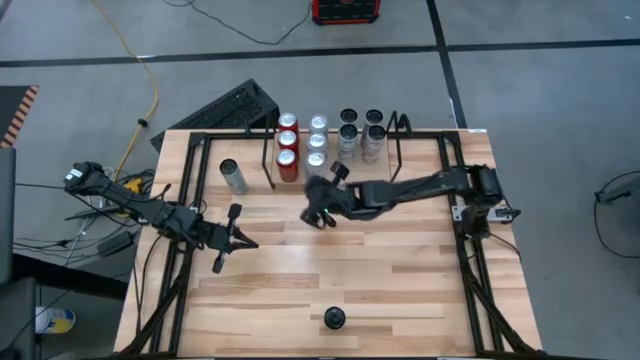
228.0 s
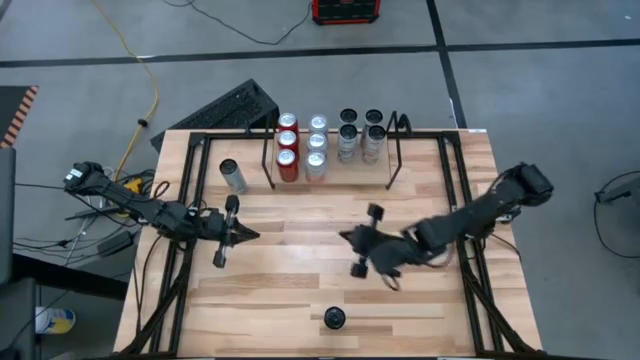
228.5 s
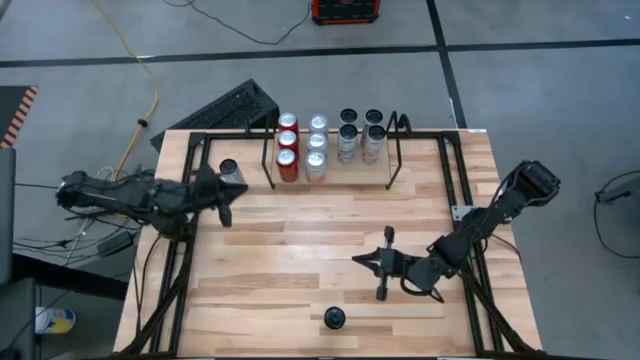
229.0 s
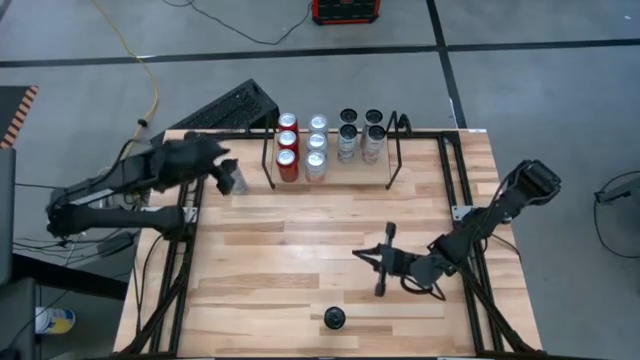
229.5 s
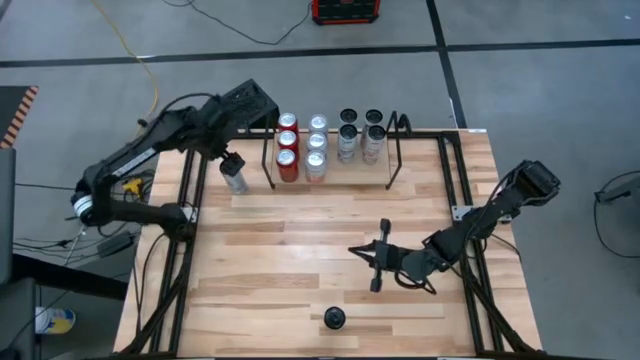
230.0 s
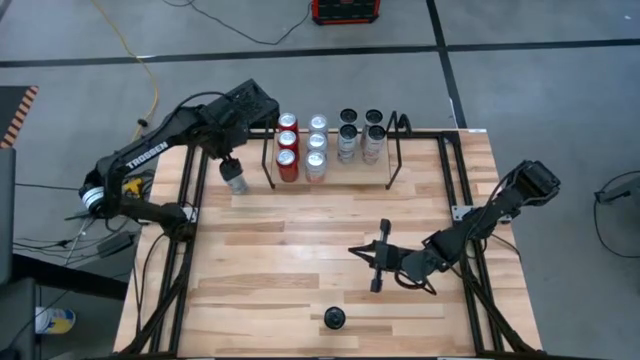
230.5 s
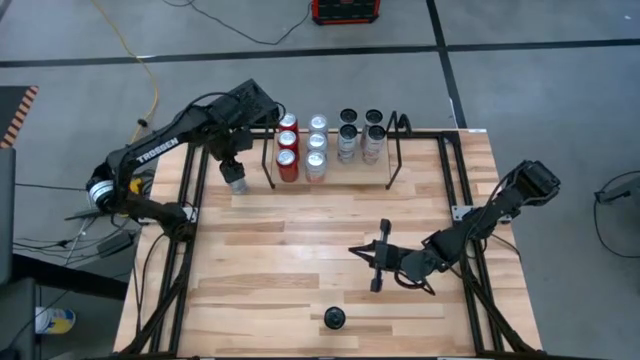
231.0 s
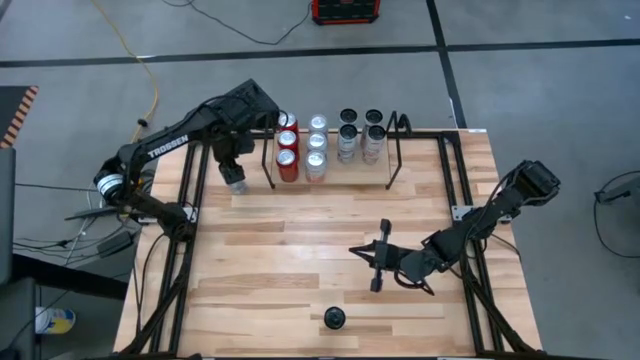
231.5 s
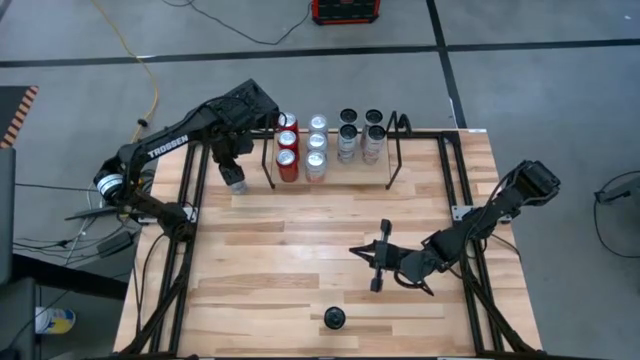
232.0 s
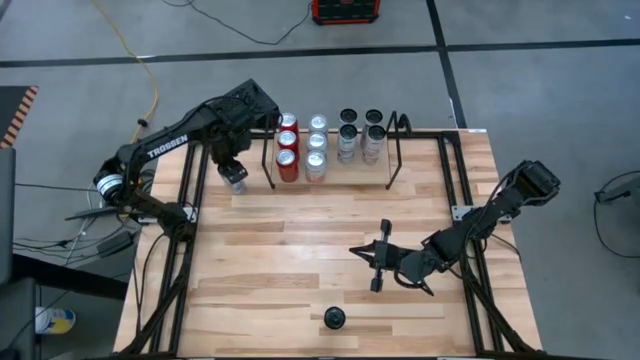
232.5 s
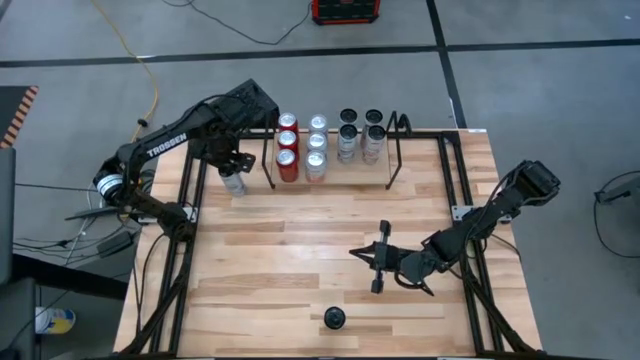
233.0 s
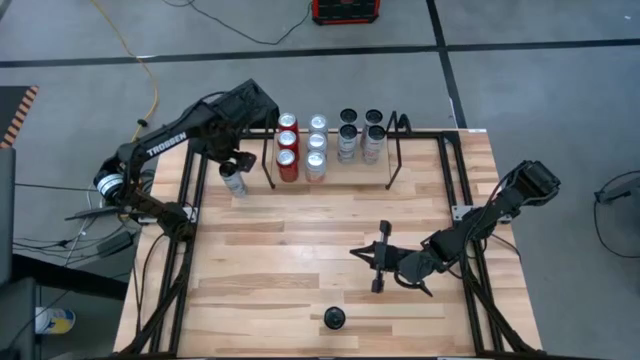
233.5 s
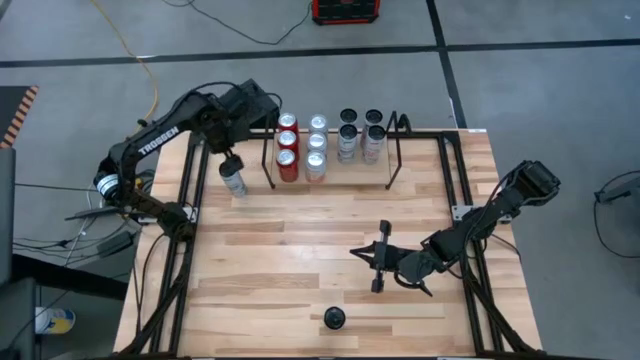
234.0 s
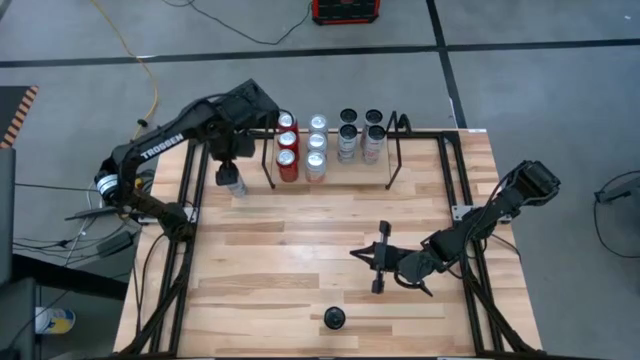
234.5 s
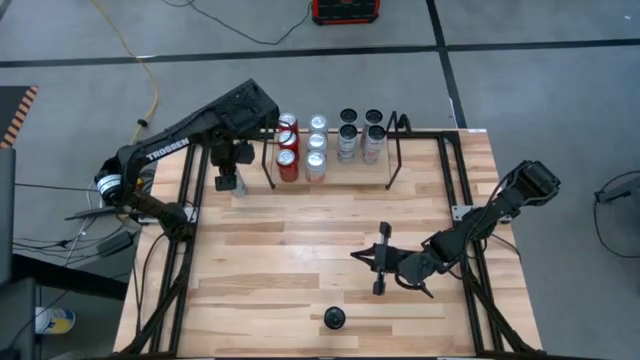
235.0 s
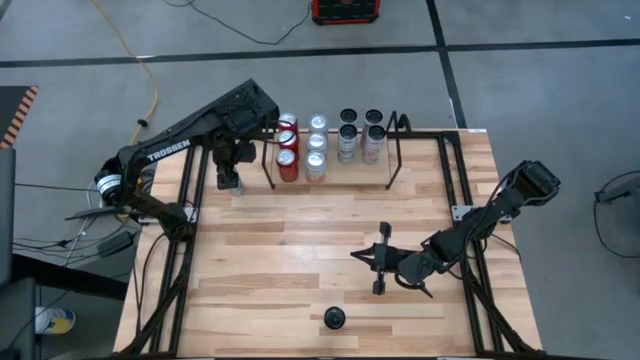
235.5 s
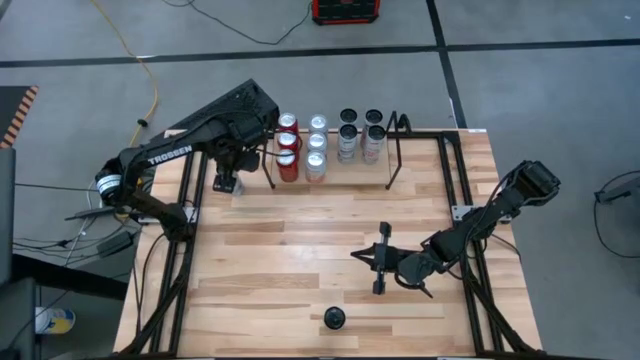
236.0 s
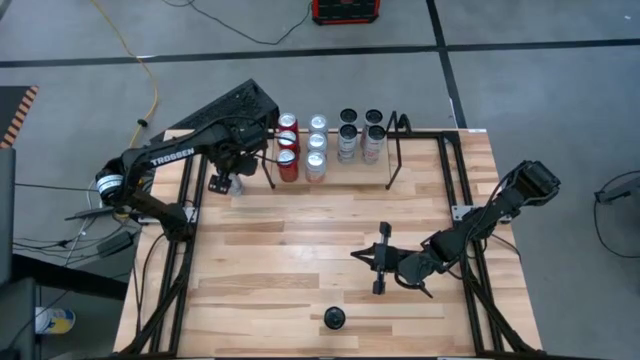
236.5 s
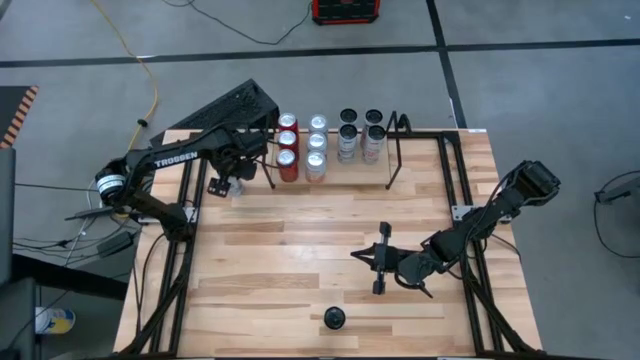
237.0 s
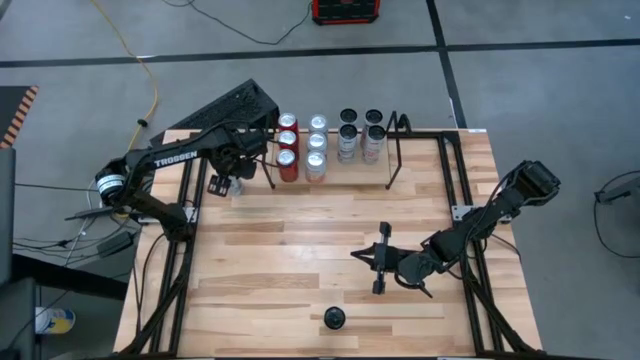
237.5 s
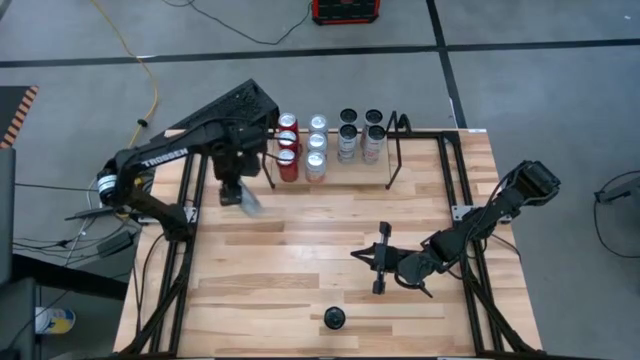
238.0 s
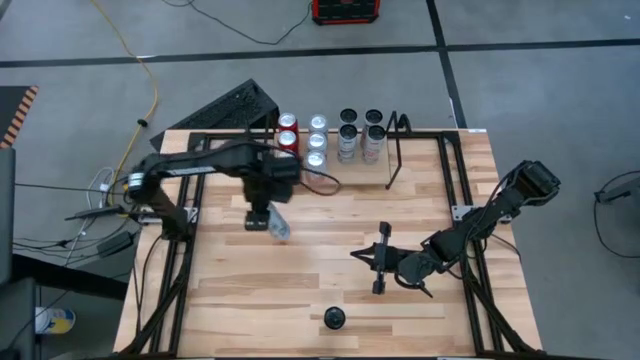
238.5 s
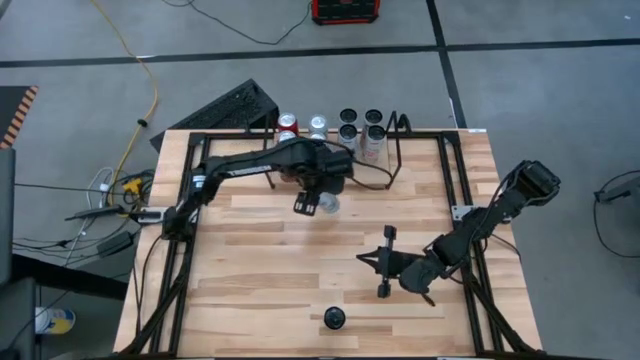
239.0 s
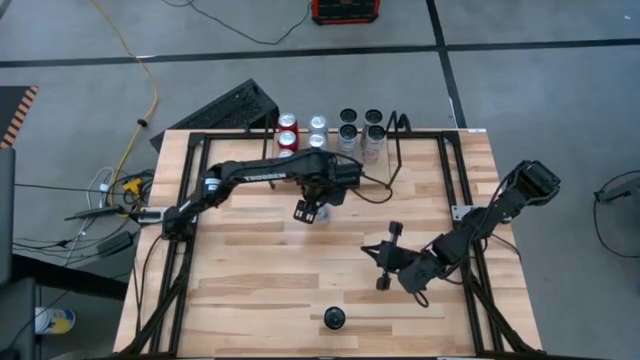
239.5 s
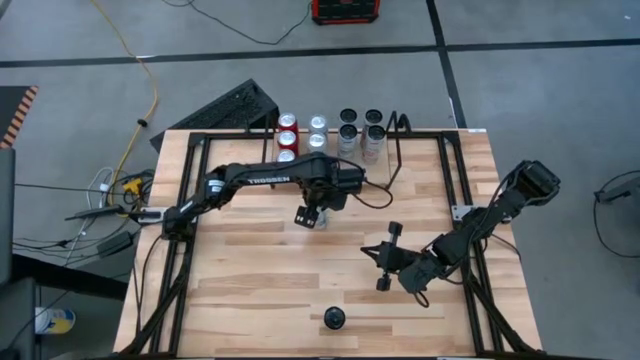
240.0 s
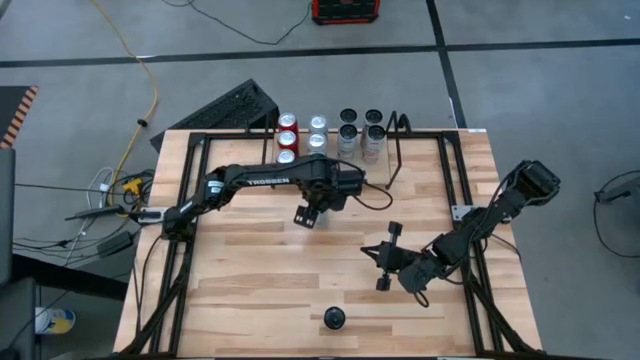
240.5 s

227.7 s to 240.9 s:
Task: Place canned beverage on shelf
Put the white blue soda can on the shelf and align with other white blue soda cans

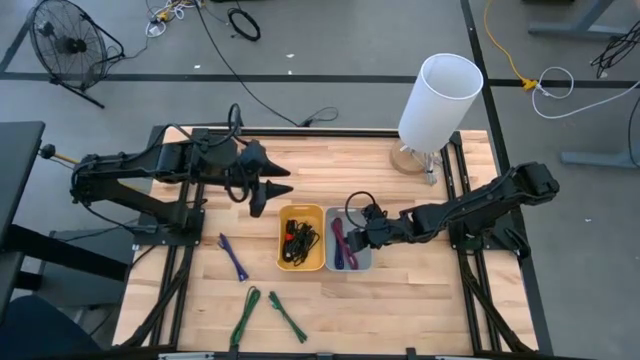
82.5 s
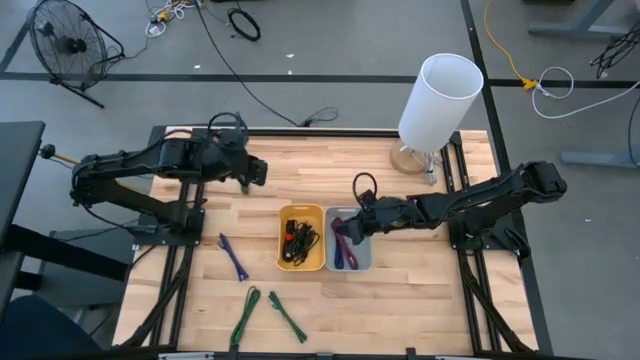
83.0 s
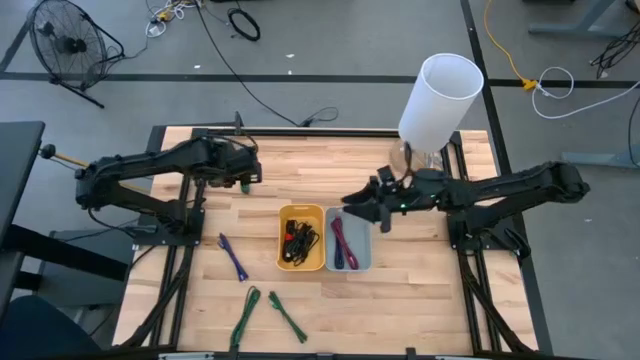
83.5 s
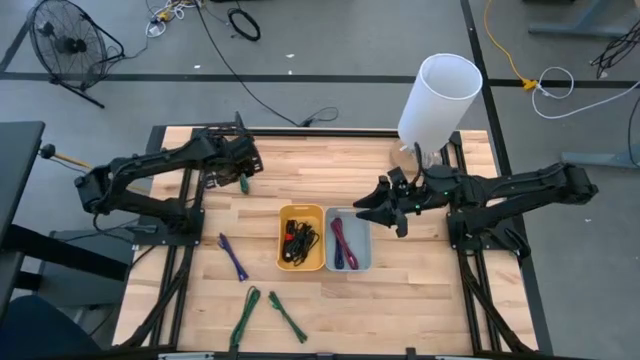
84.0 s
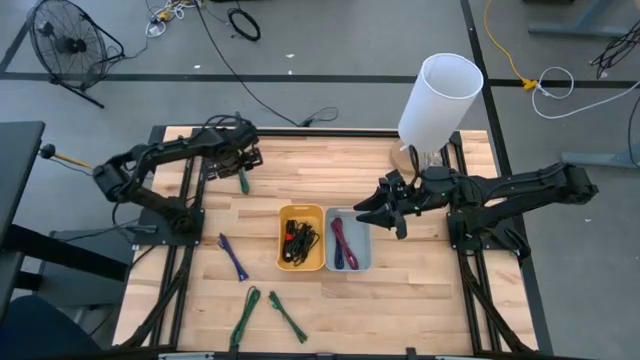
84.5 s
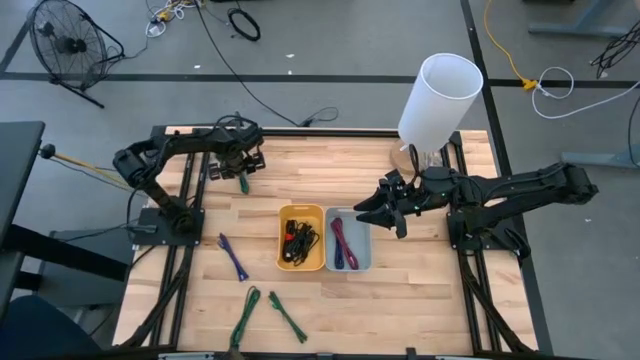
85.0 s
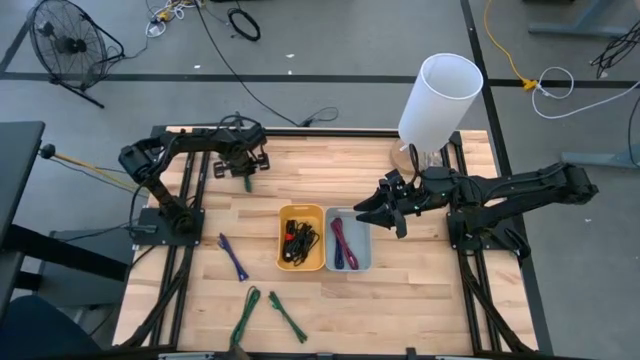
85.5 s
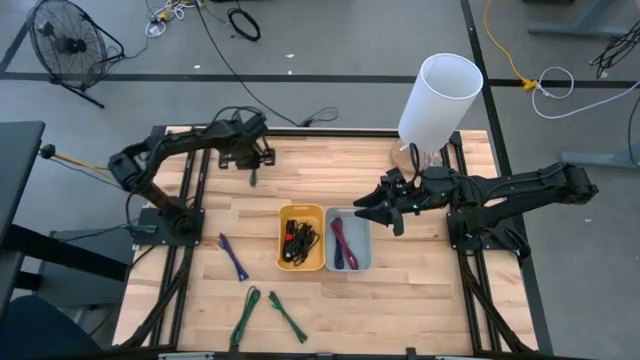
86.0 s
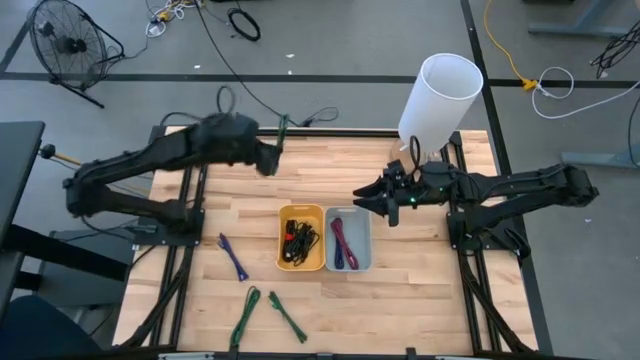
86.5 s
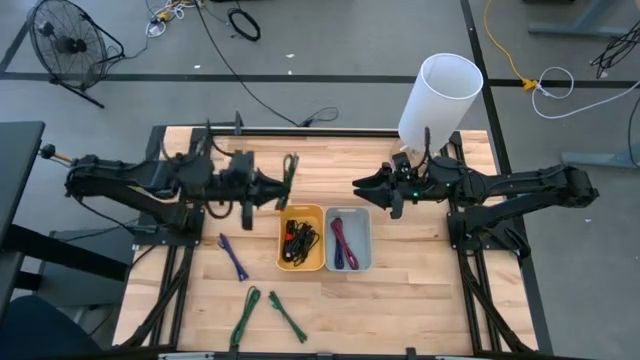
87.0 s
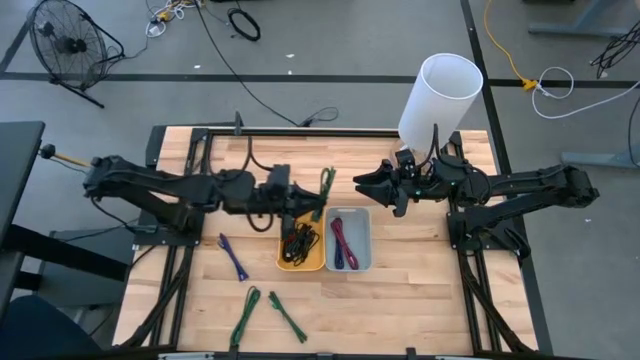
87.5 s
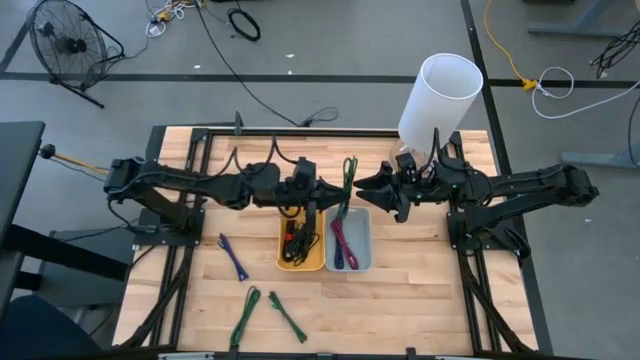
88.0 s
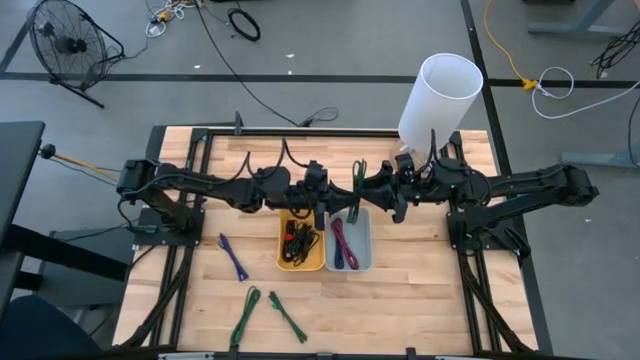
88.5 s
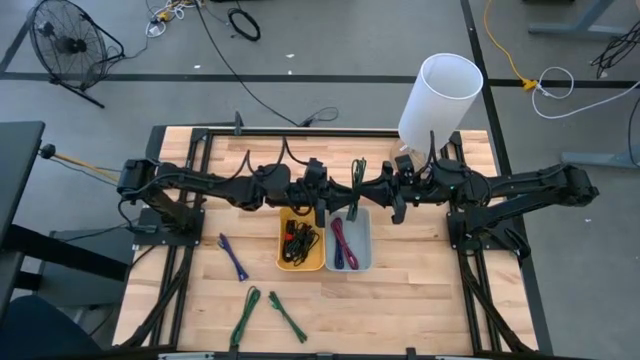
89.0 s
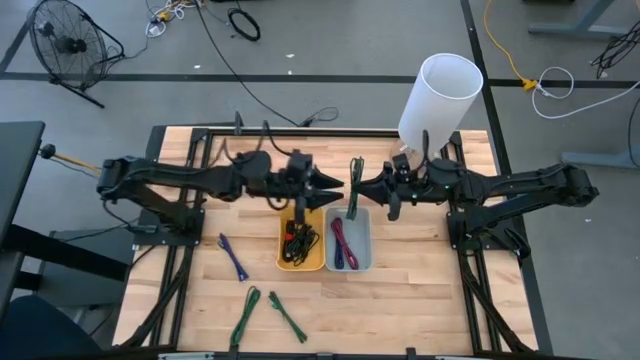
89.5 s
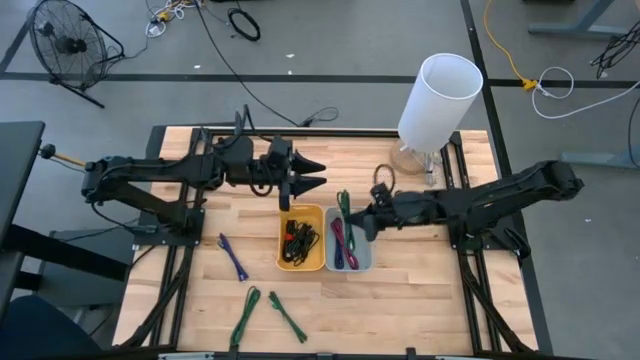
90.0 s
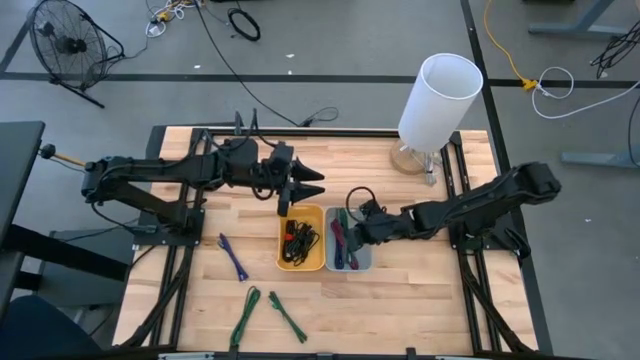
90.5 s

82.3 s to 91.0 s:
Task: Pick & Place USB Port
Put the black green charger cable into the gray bin

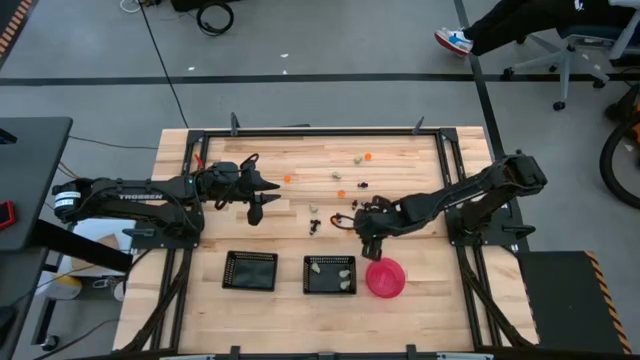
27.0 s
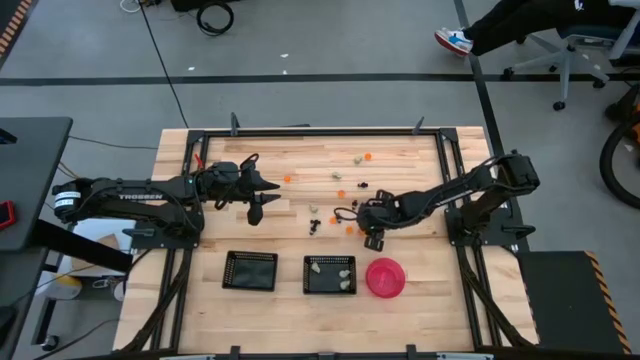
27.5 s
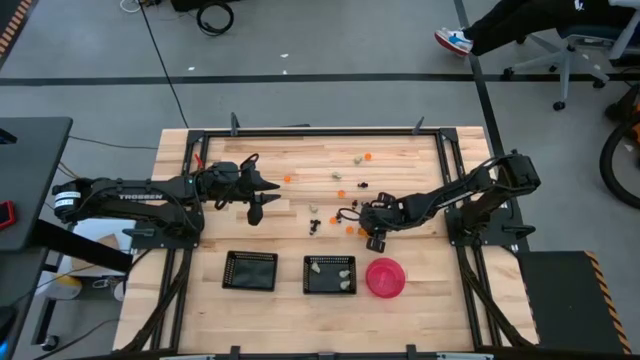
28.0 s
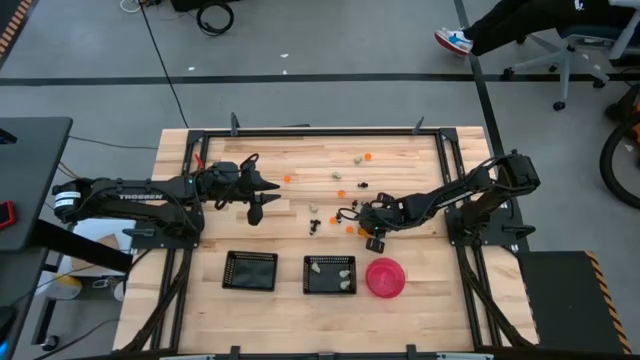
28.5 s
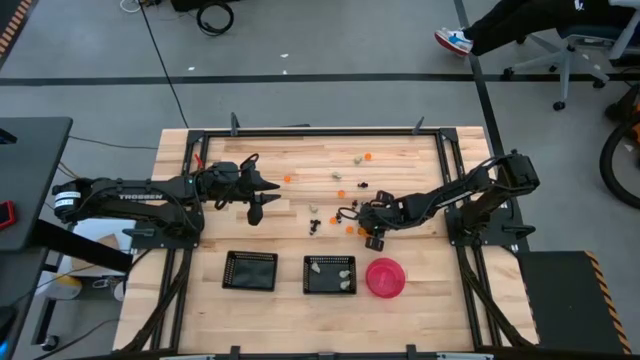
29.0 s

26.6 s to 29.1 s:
Task: Sort Halloween decoration
Put the white skull toy into the right black bin
